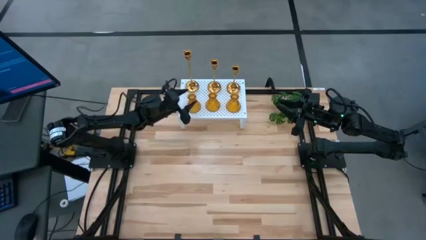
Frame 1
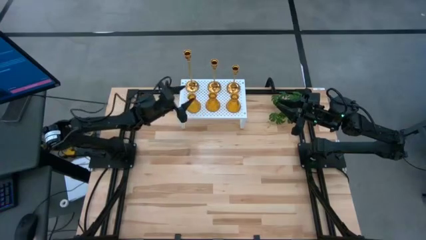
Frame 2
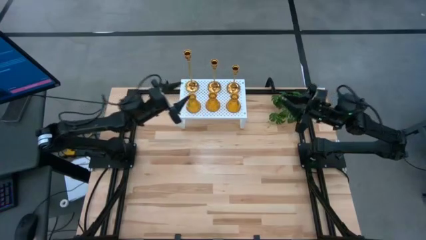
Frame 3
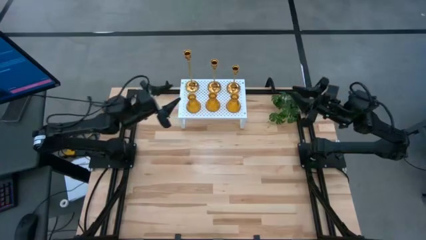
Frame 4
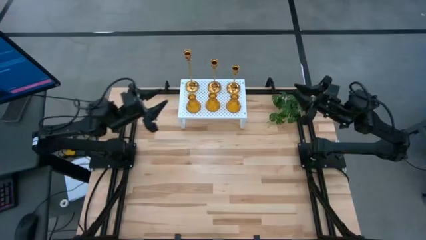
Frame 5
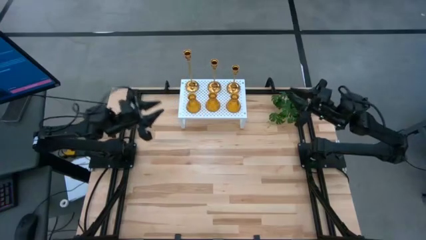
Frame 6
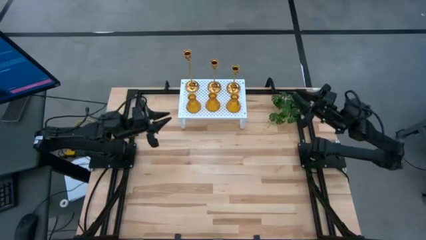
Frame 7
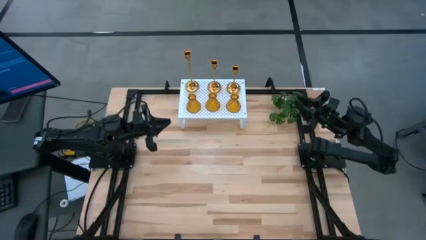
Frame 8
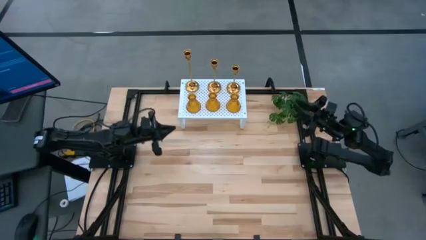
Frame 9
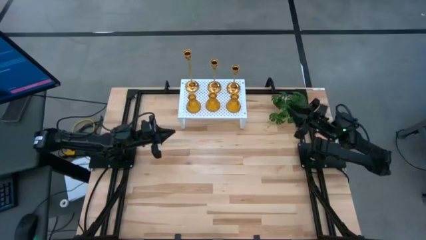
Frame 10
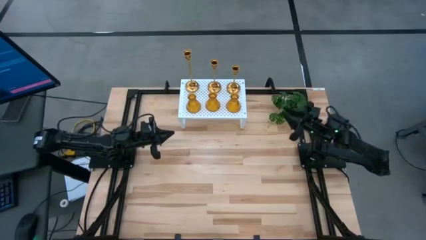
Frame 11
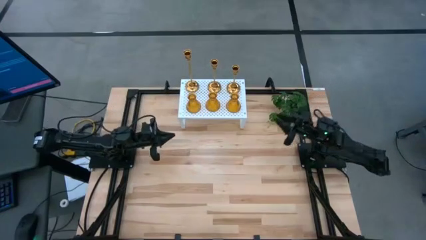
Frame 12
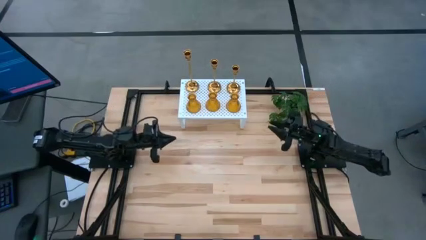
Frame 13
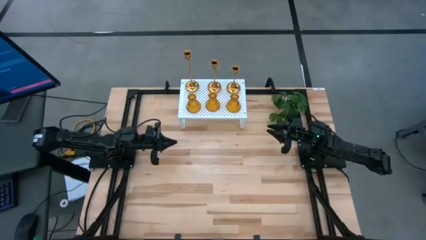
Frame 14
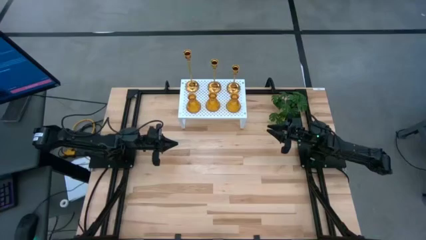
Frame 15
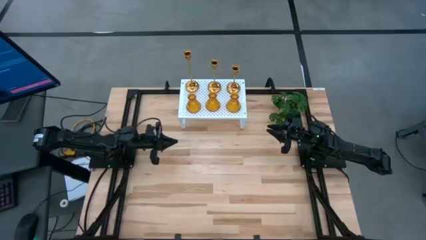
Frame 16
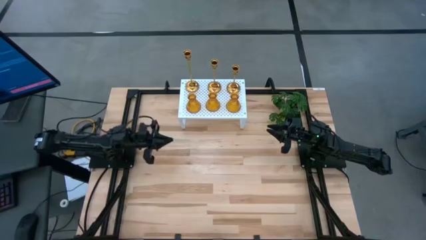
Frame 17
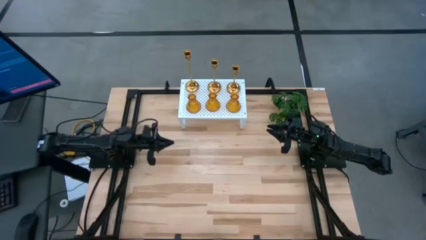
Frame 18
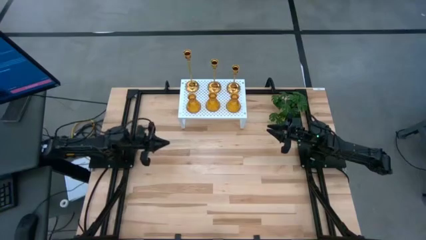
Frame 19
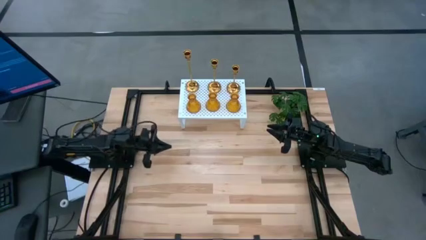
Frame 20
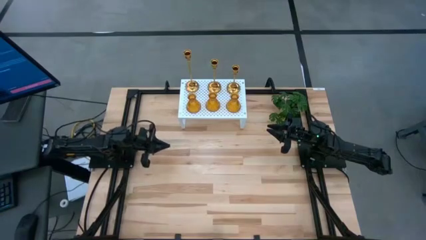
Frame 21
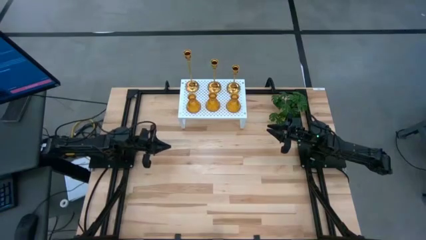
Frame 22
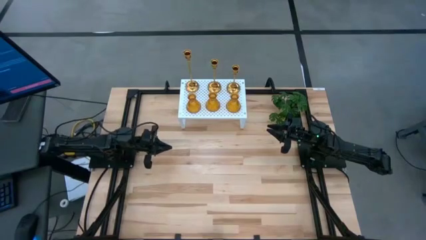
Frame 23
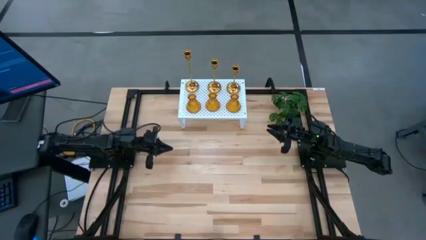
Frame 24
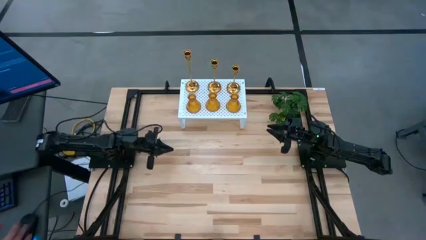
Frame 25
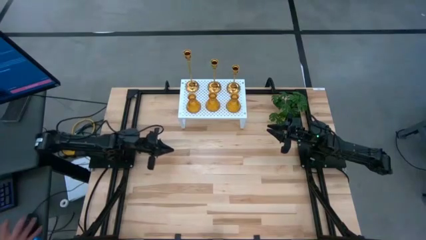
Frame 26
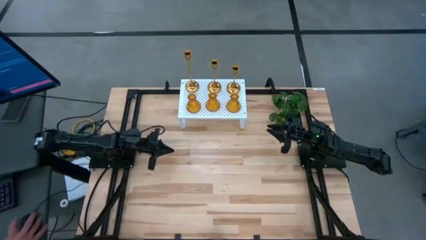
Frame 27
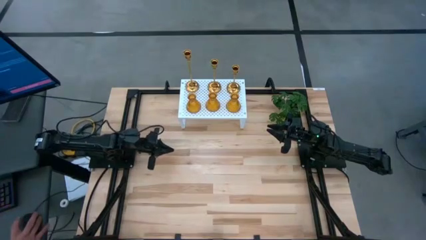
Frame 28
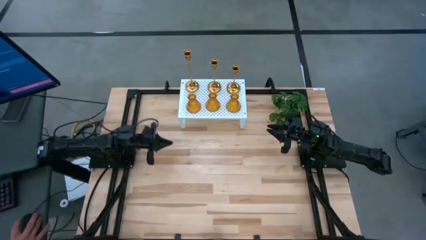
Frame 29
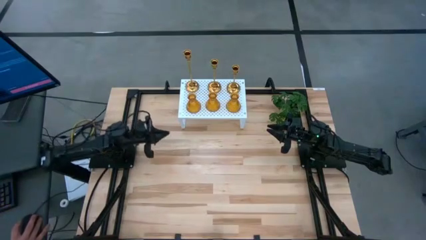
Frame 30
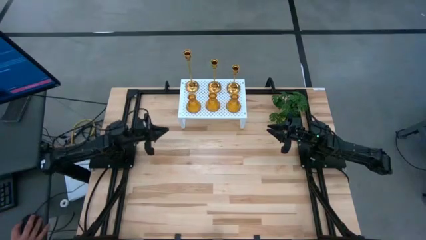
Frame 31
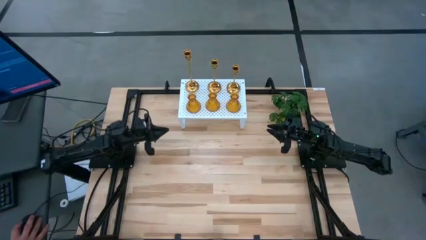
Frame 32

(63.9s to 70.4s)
Task: Pick & Place candle stick holders
Return to Home Position

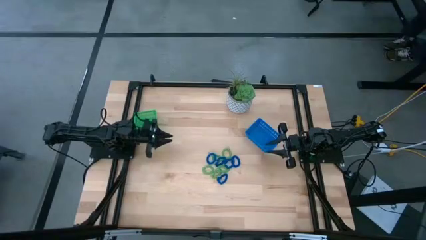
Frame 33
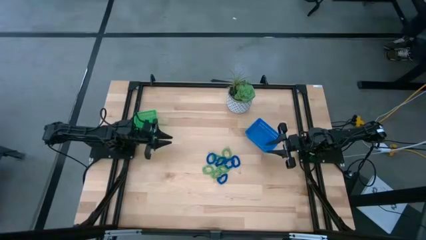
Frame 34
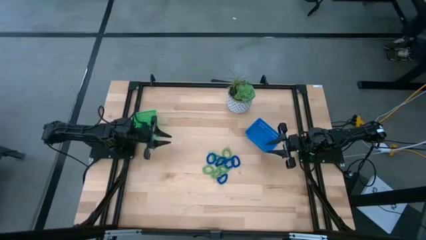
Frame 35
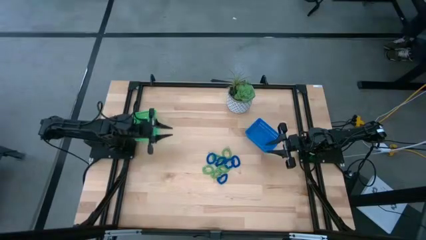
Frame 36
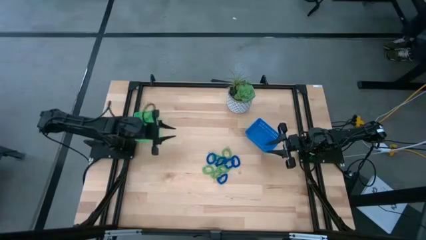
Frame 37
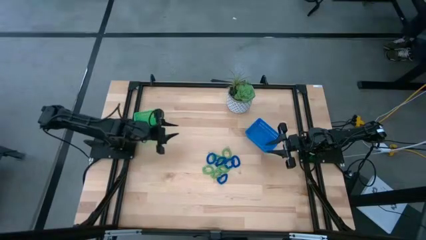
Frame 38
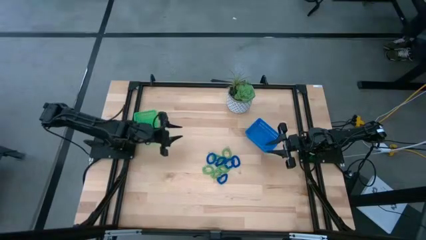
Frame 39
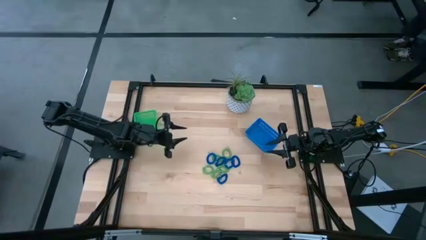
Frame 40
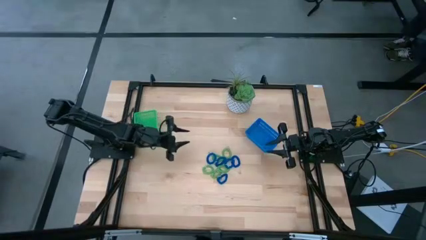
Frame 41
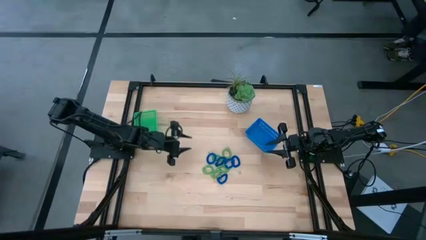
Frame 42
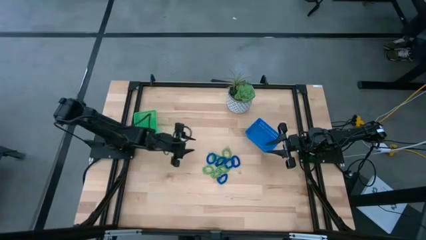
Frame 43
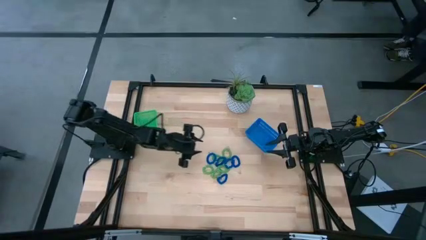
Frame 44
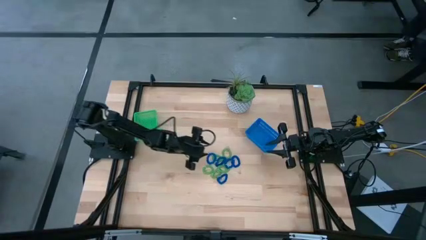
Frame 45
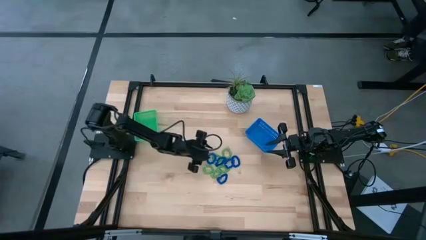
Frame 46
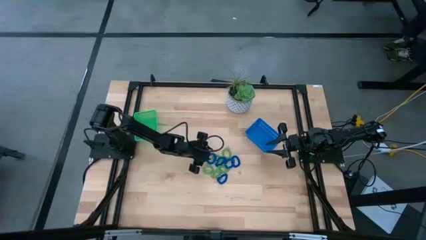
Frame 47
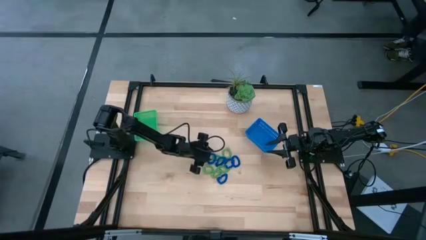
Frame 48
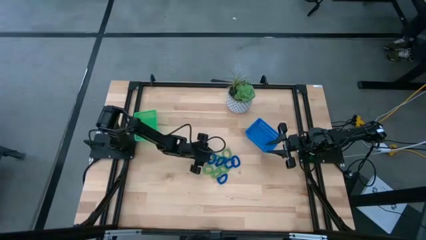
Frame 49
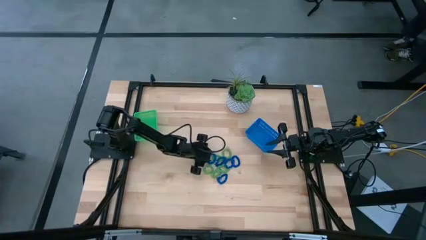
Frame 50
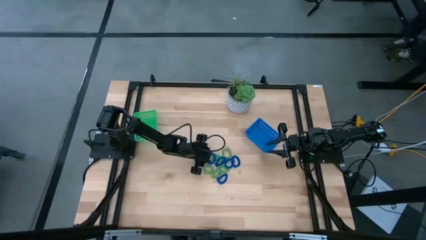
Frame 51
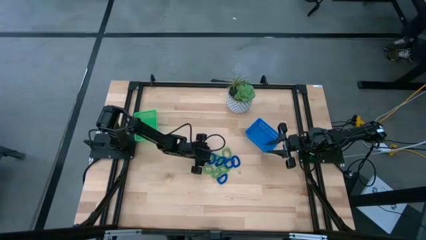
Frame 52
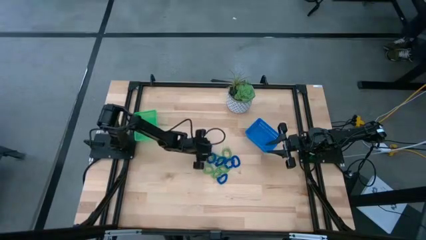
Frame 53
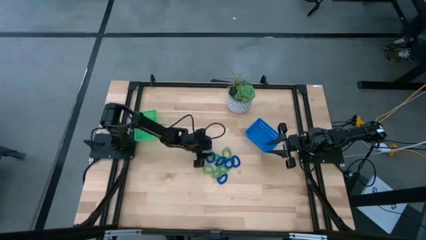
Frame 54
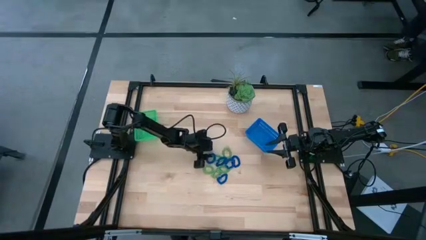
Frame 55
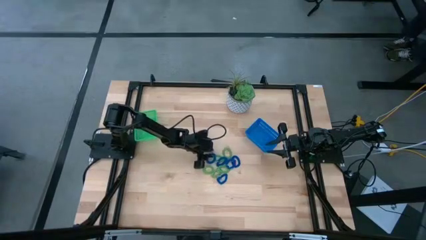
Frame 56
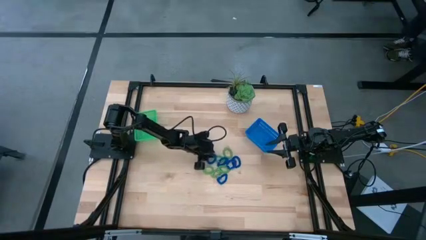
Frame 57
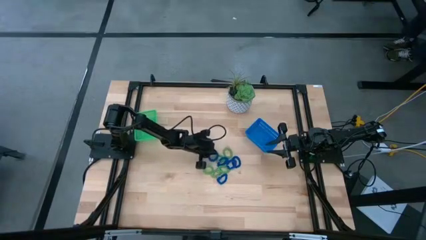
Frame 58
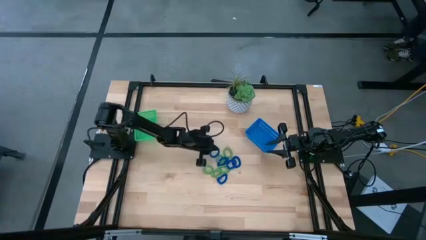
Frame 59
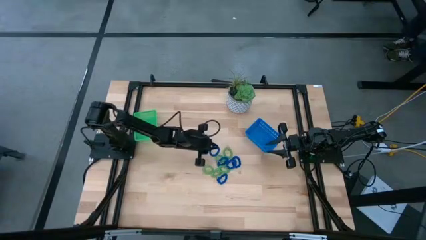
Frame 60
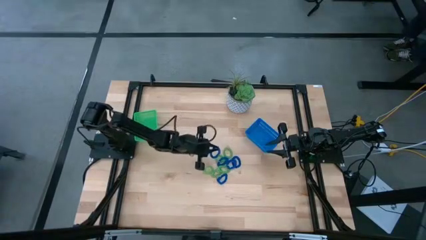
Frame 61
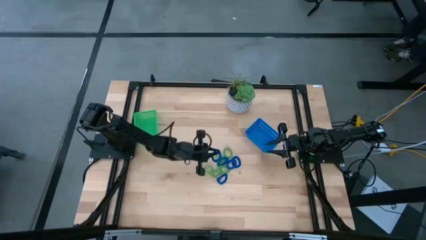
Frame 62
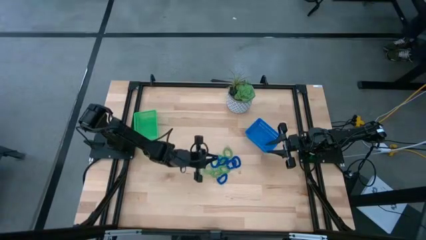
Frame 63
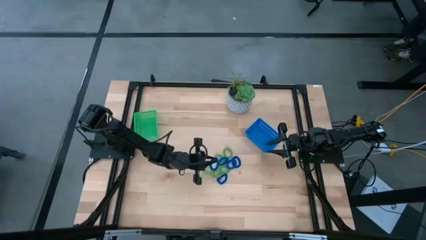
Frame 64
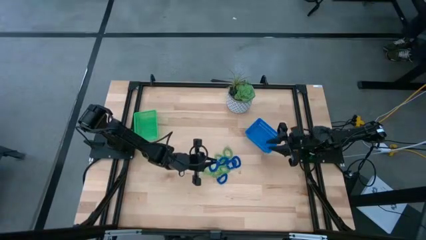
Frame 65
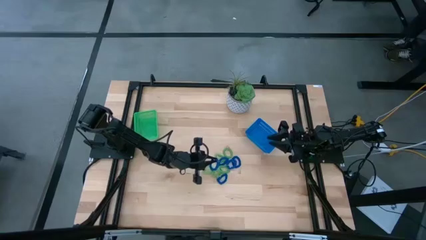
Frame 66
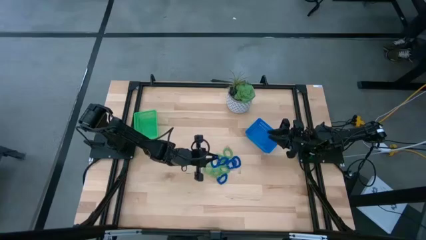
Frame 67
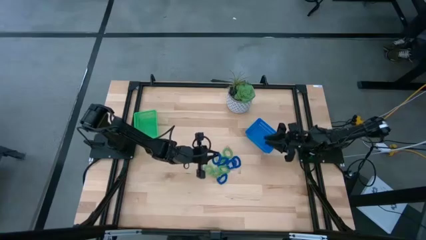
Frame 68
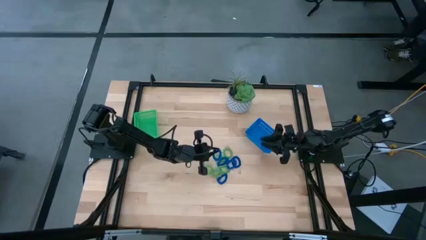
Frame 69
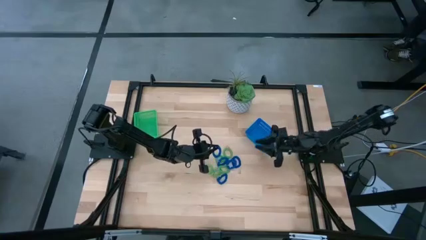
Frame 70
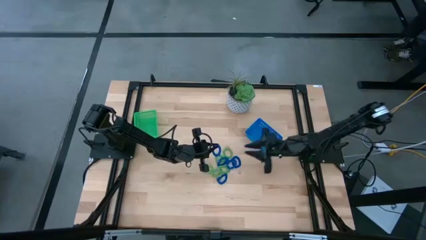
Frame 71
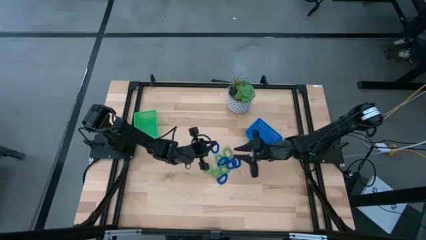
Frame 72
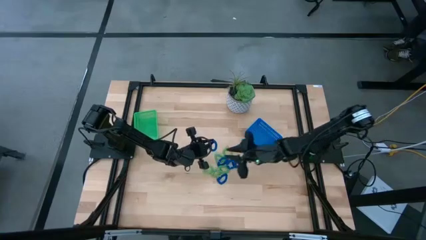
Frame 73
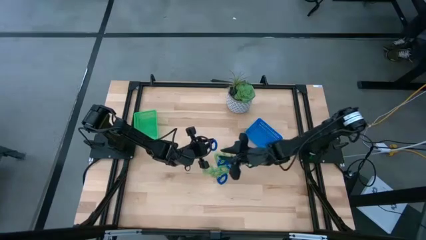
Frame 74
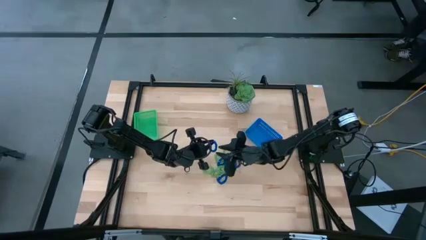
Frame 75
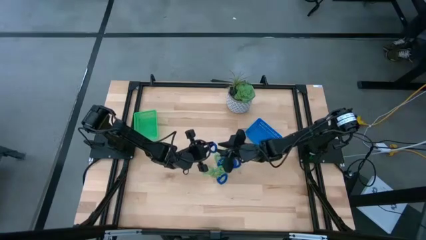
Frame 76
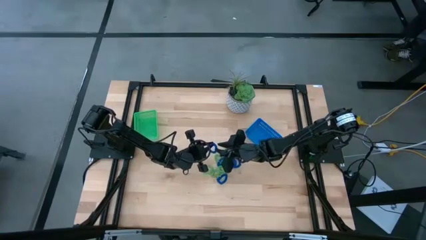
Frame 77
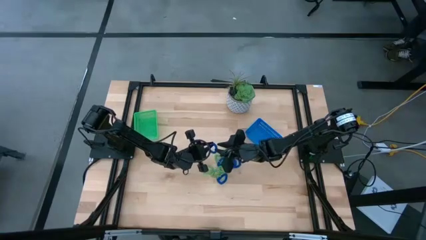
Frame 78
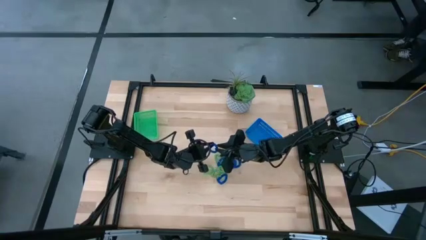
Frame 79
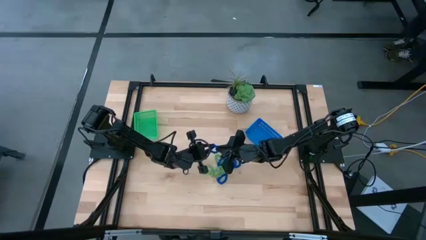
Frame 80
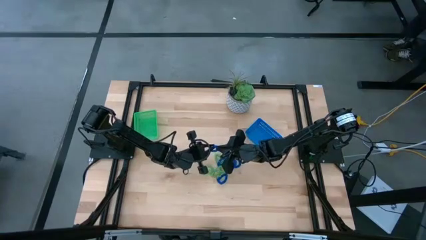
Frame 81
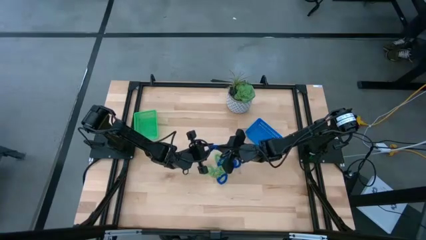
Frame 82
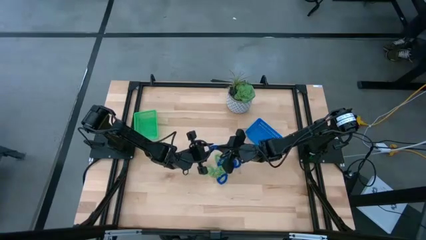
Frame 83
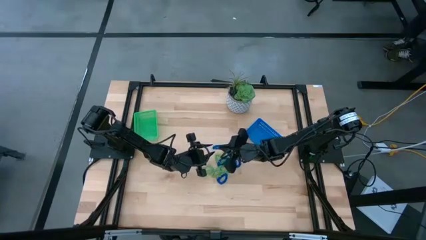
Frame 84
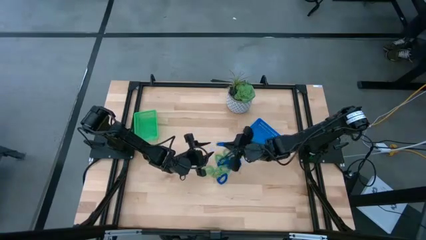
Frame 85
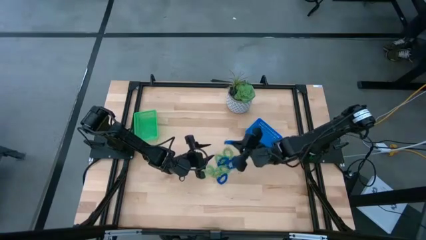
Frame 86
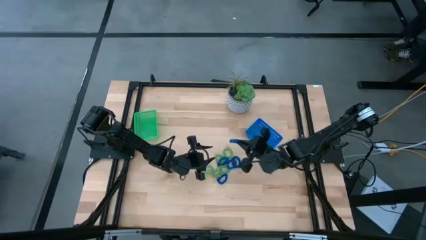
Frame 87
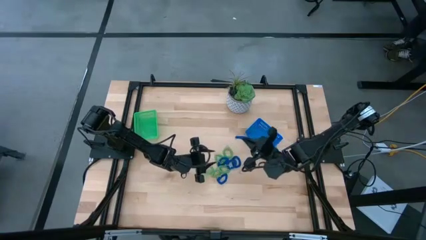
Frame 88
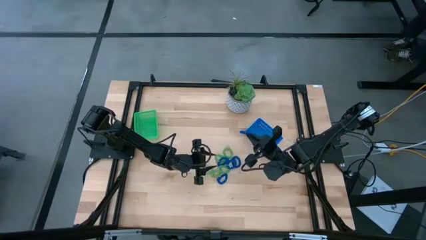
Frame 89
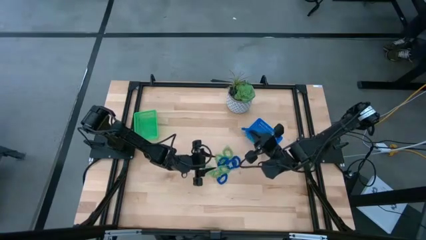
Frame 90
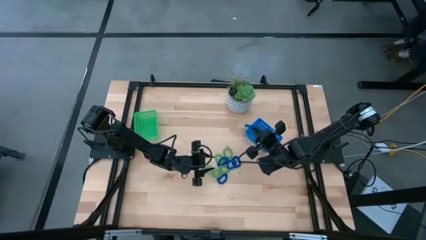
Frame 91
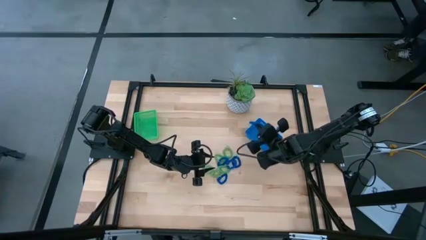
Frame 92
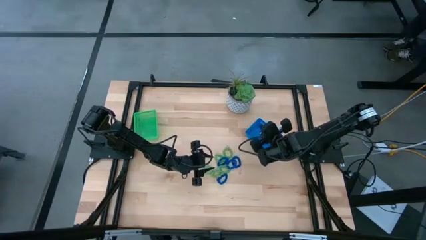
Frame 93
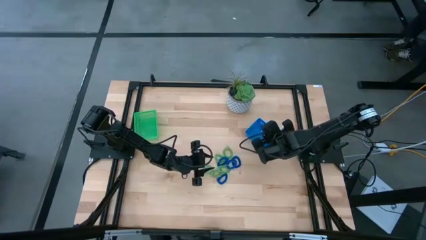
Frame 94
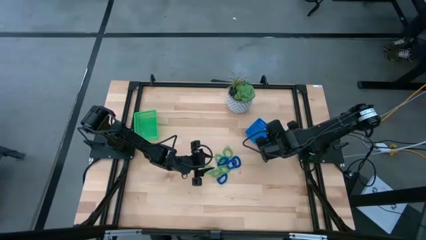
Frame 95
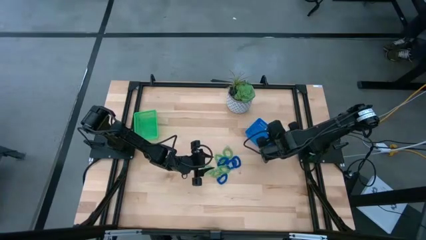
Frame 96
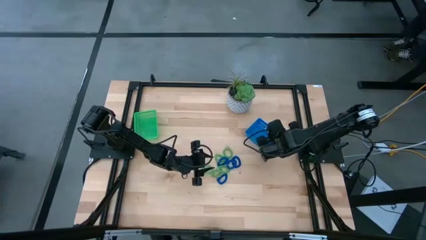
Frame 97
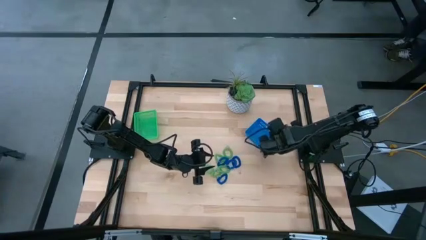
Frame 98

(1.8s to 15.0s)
Task: Sort spring keychains
Put the blue spring keychain in the blue bin
